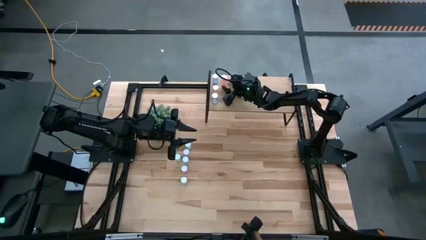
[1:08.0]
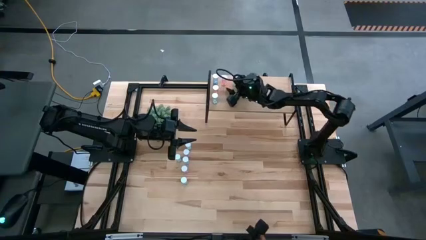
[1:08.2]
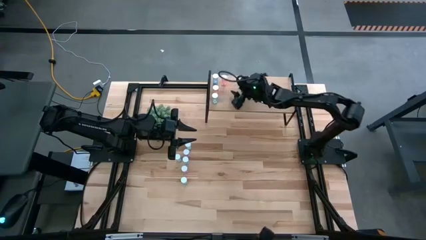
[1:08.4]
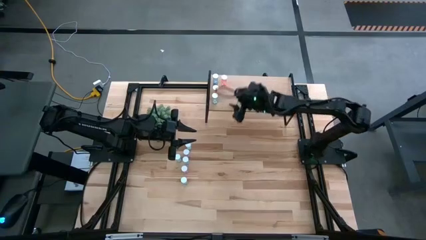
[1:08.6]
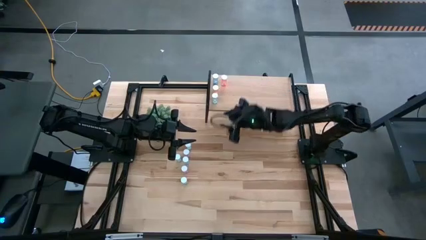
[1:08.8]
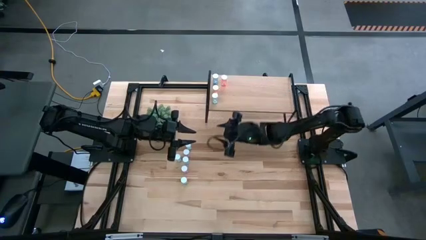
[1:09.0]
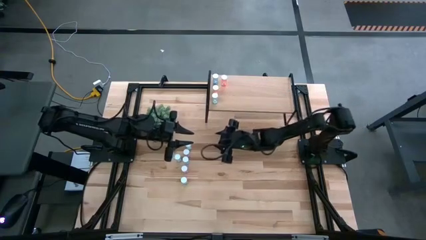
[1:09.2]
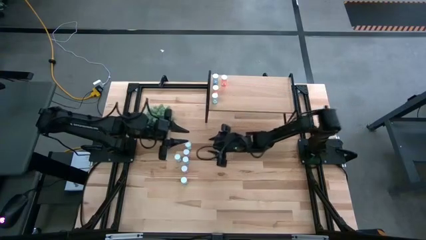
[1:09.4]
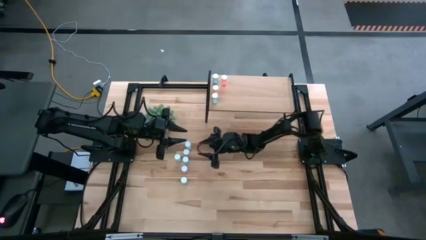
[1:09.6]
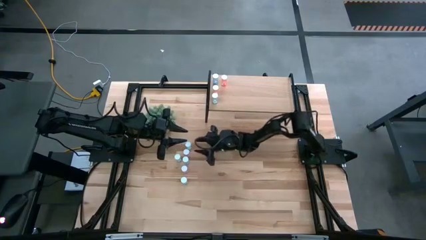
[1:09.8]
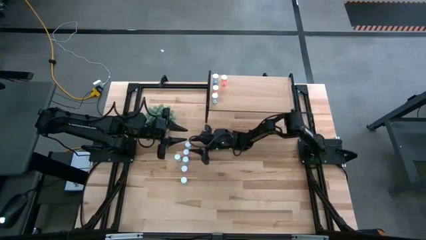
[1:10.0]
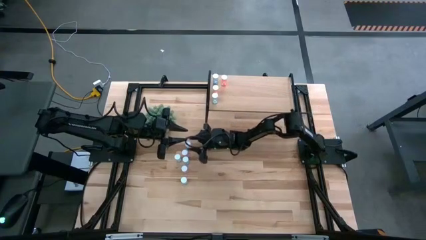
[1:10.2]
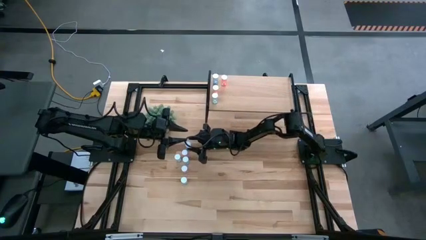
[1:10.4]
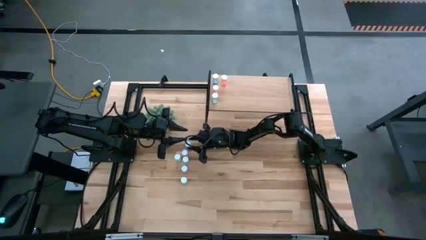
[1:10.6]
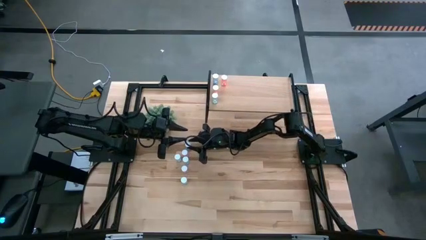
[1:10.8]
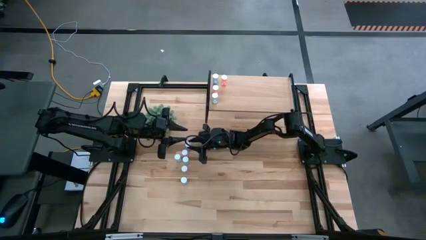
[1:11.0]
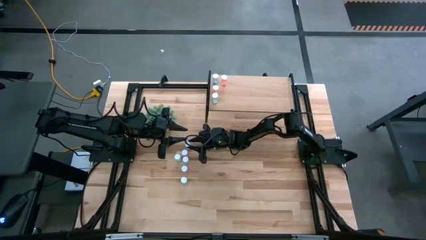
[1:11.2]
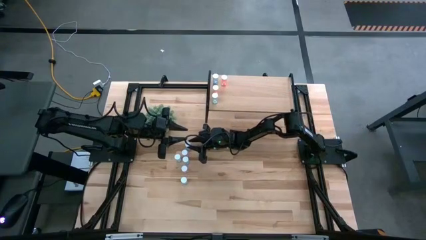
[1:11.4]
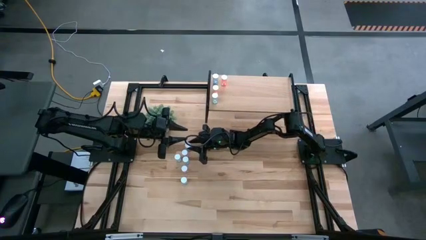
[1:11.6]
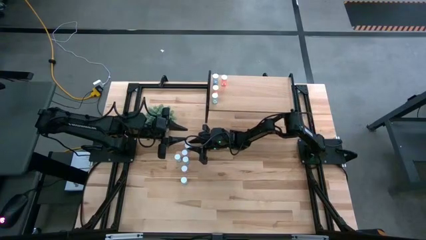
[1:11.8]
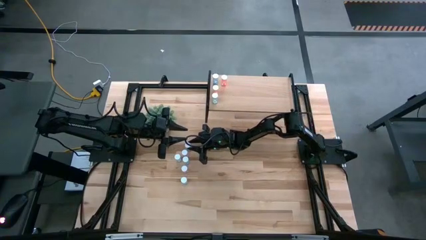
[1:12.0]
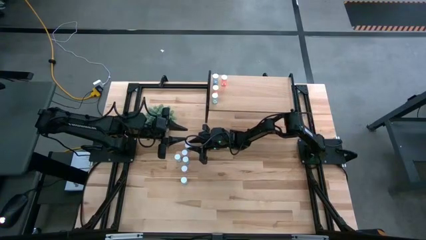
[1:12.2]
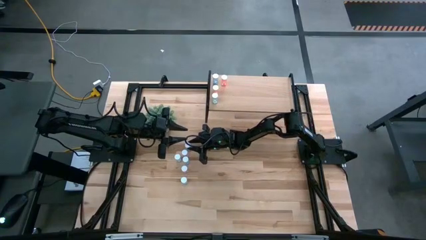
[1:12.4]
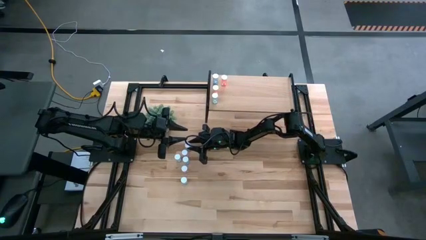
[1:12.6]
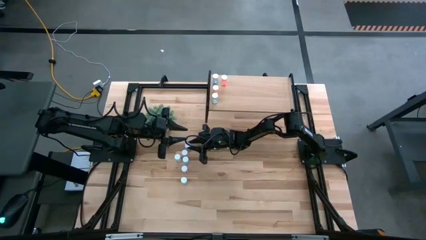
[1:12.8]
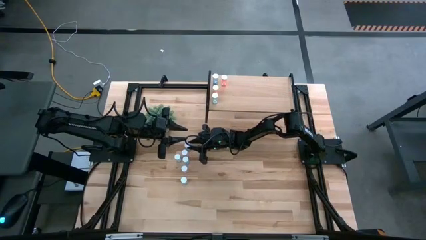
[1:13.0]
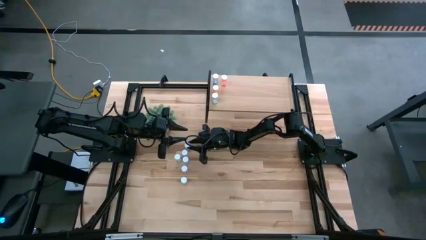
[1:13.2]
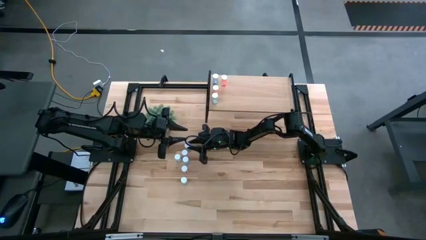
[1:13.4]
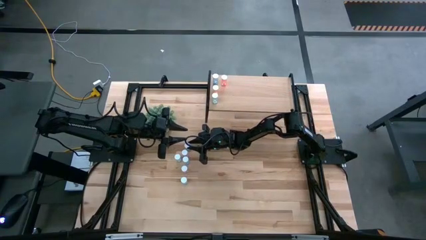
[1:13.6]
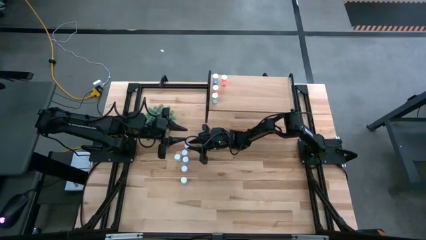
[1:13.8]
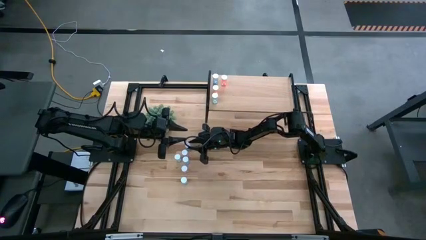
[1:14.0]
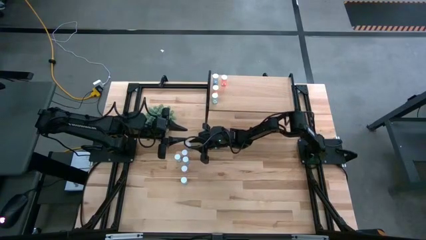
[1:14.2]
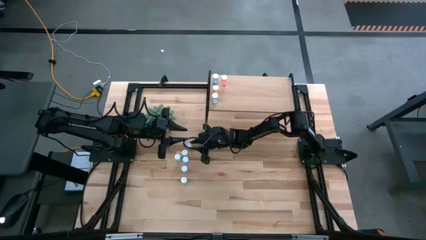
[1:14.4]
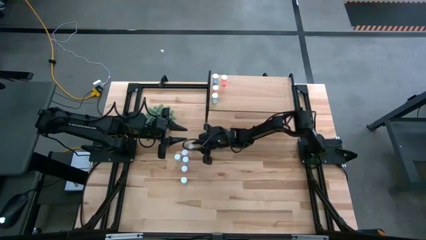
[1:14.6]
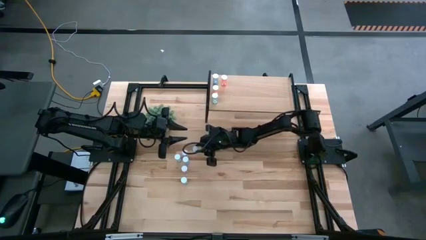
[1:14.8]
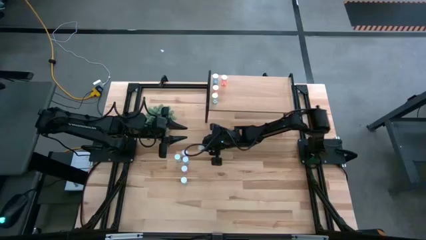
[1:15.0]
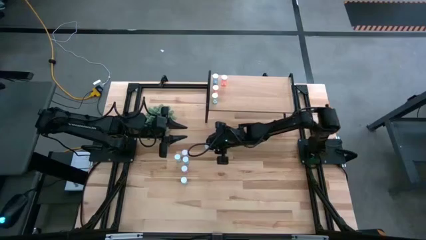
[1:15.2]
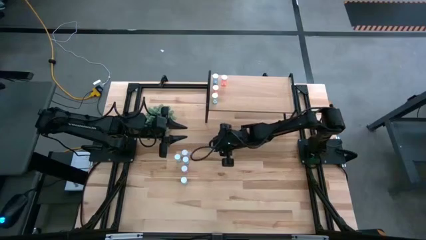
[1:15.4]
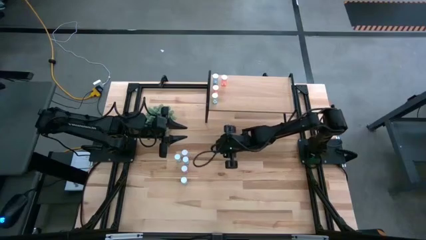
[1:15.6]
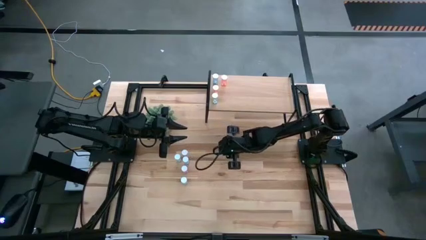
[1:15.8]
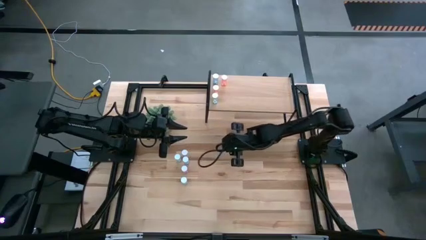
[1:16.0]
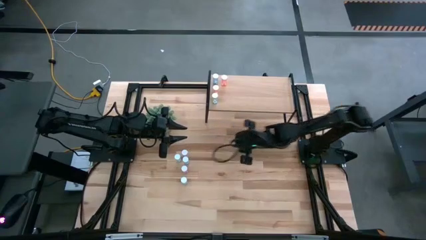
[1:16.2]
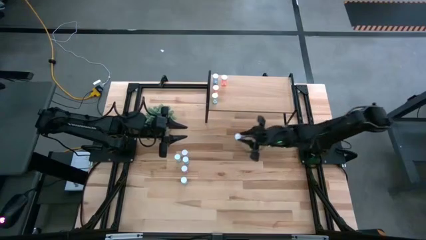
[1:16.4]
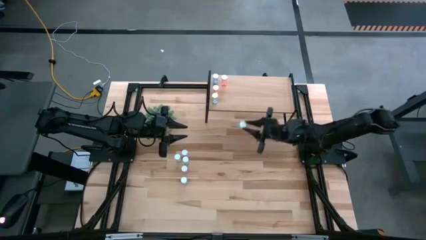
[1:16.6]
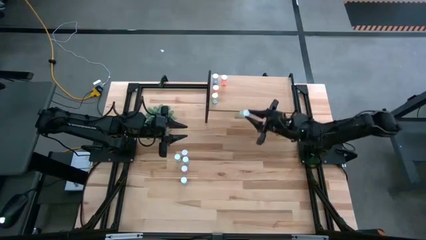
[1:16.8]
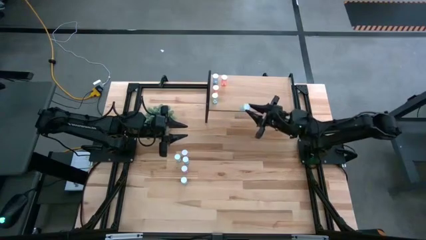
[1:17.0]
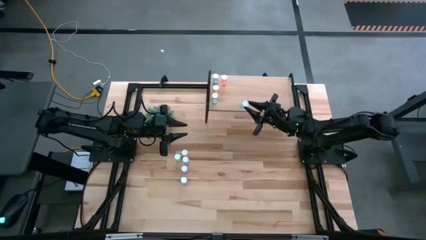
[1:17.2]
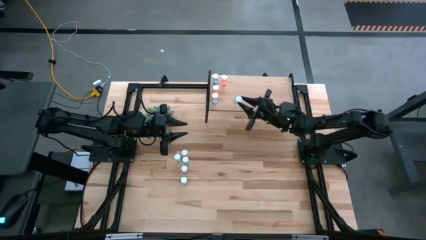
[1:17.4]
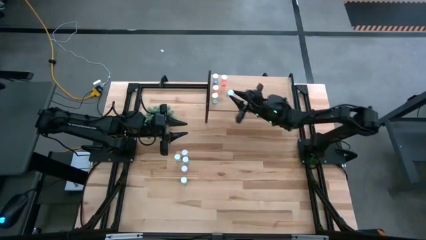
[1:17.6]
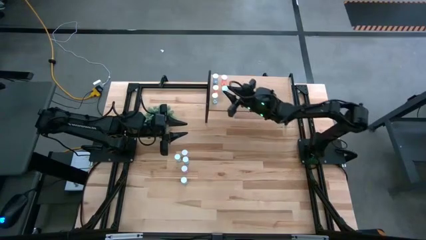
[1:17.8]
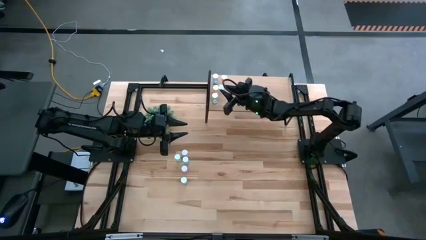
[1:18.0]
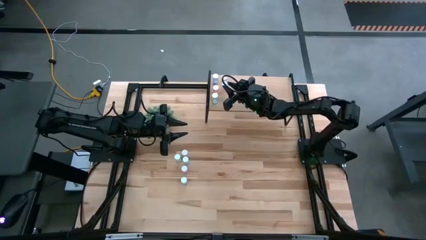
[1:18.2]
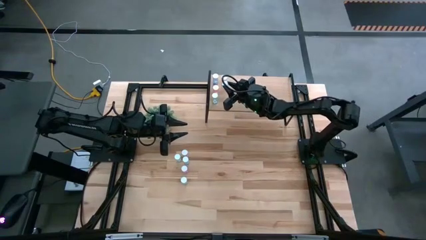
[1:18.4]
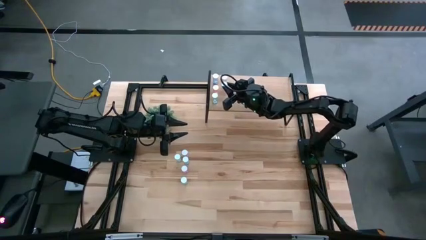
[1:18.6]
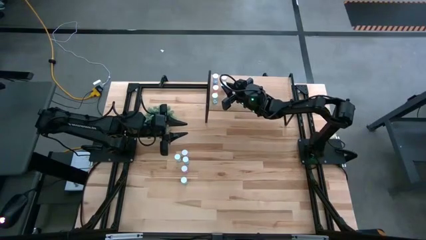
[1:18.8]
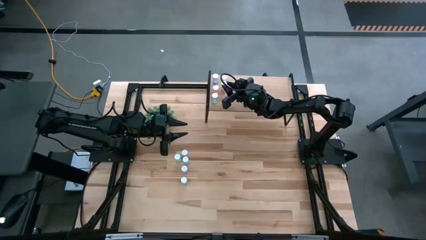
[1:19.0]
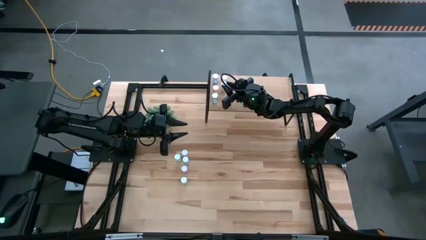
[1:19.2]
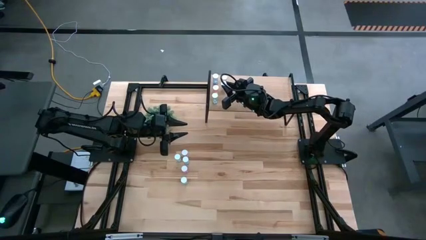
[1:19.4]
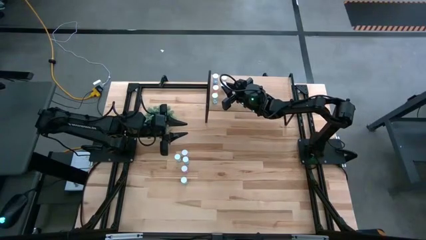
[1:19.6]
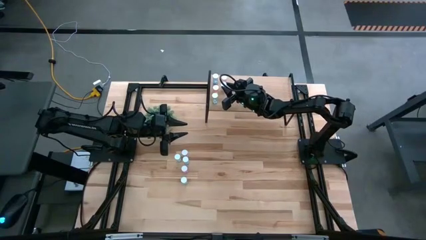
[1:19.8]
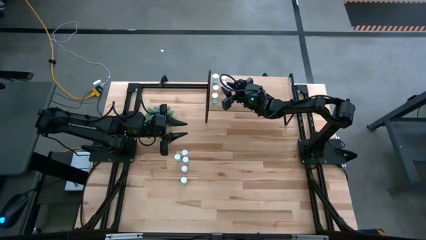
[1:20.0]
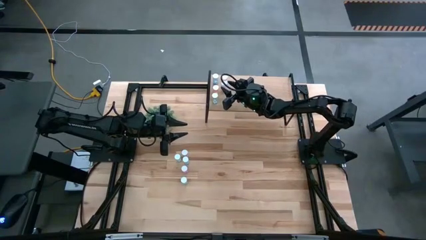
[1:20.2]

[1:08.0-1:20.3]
Task: Pick and place medicine bottles onto shelf by color
Put the transparent green medicine bottle on the shelf
